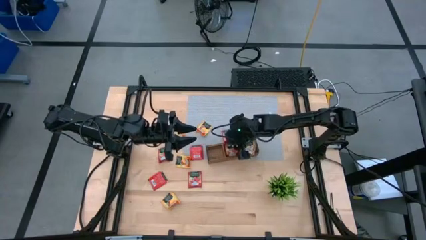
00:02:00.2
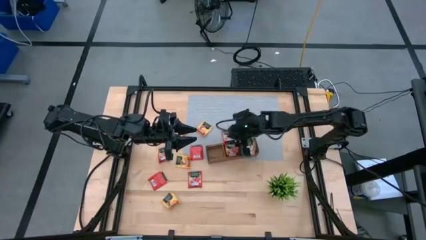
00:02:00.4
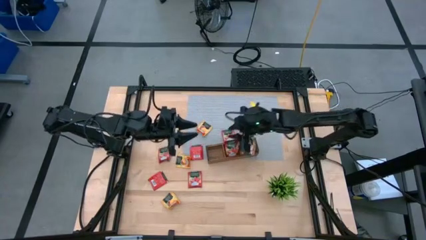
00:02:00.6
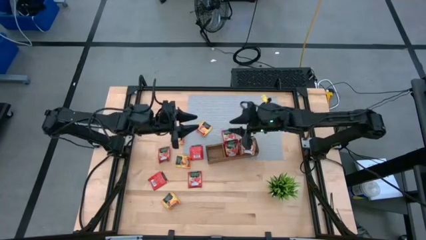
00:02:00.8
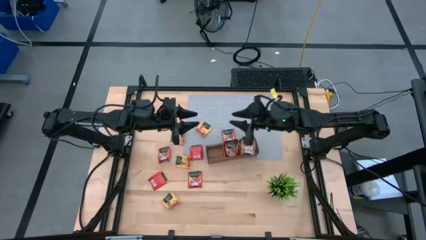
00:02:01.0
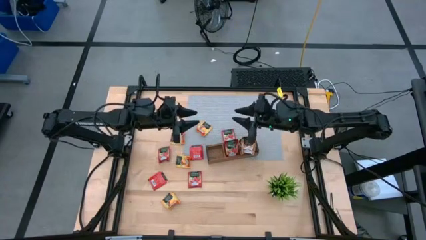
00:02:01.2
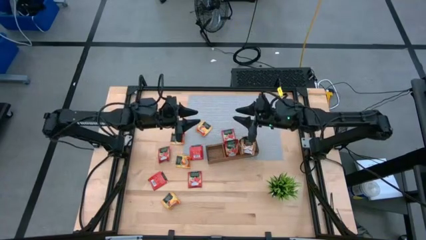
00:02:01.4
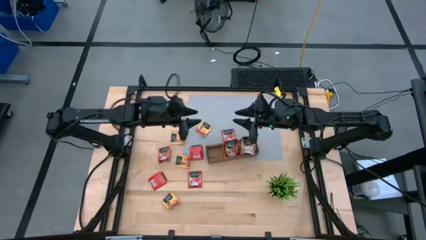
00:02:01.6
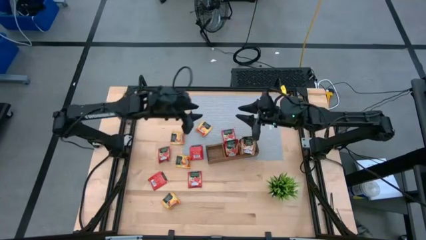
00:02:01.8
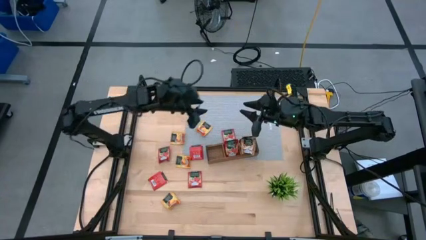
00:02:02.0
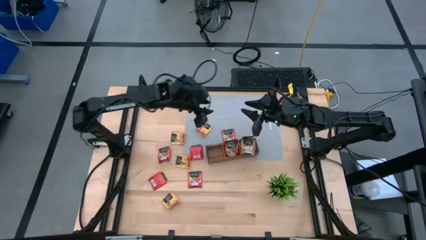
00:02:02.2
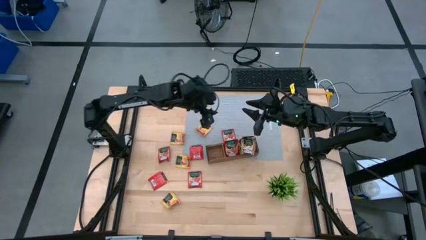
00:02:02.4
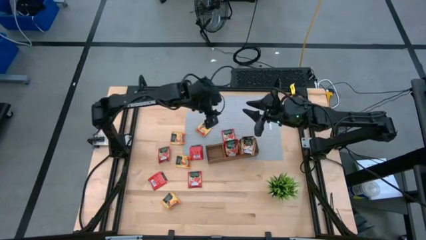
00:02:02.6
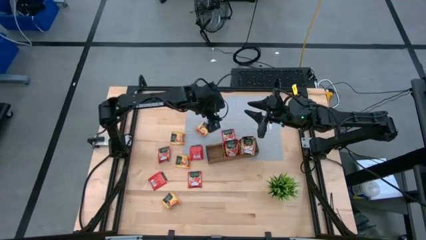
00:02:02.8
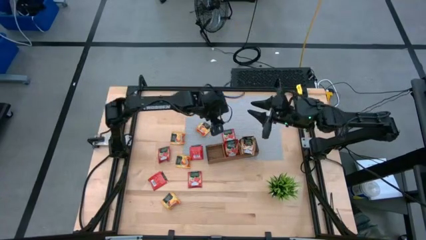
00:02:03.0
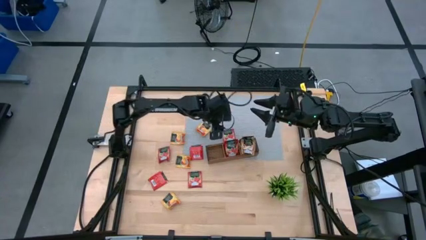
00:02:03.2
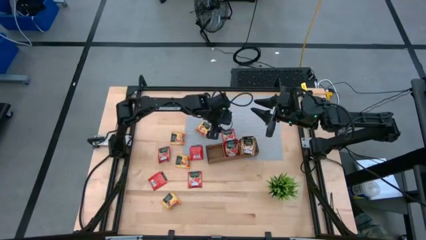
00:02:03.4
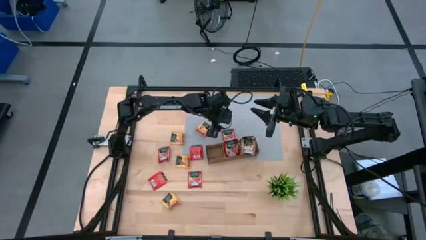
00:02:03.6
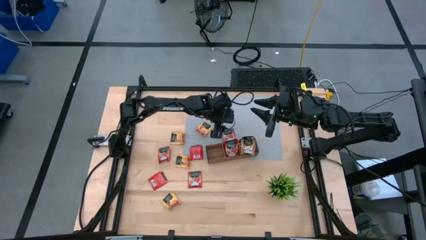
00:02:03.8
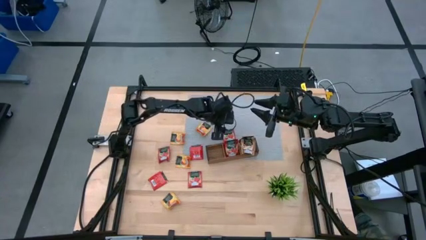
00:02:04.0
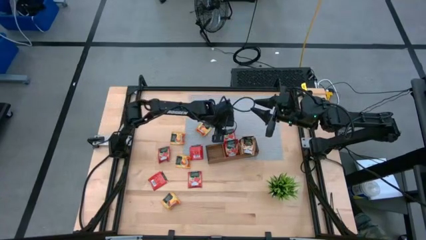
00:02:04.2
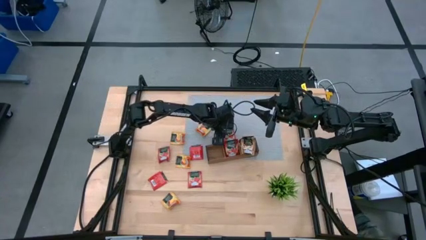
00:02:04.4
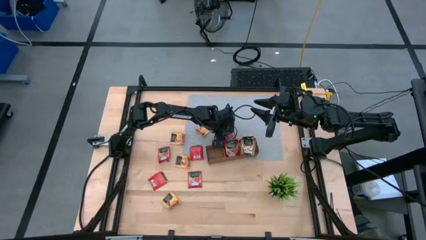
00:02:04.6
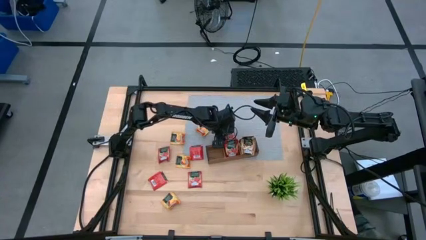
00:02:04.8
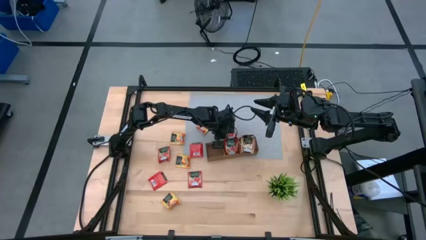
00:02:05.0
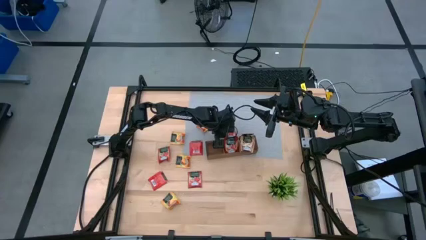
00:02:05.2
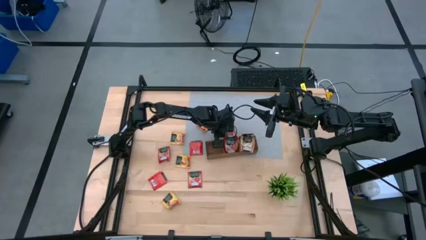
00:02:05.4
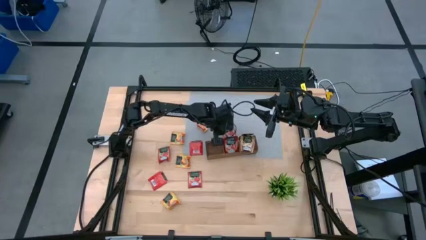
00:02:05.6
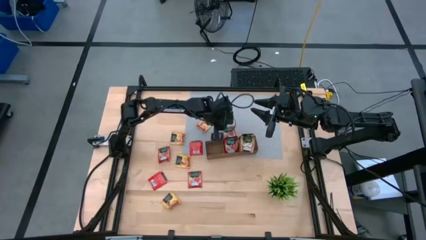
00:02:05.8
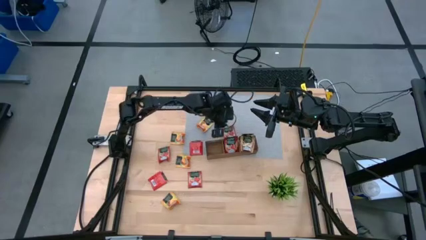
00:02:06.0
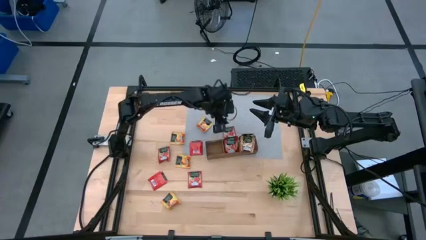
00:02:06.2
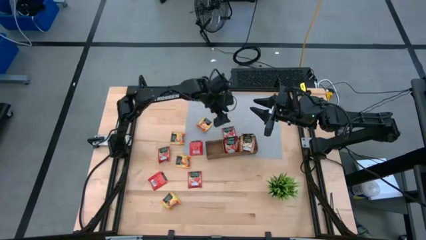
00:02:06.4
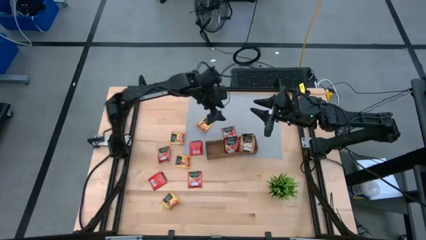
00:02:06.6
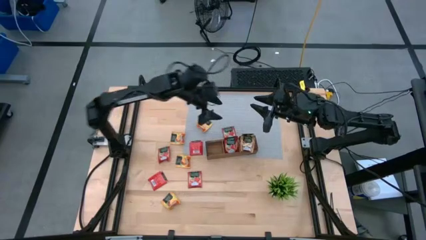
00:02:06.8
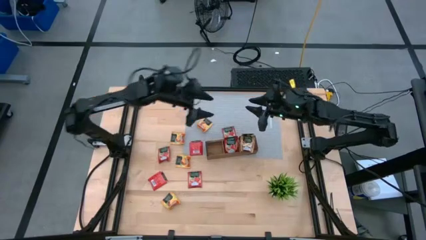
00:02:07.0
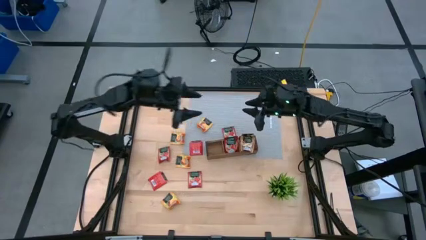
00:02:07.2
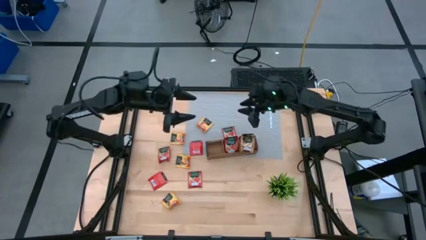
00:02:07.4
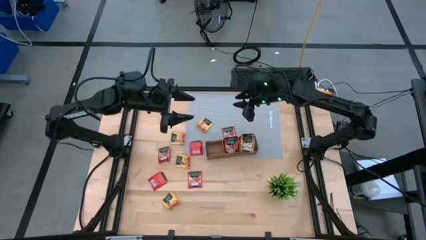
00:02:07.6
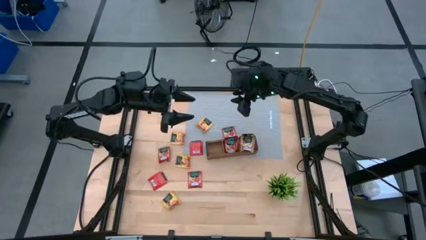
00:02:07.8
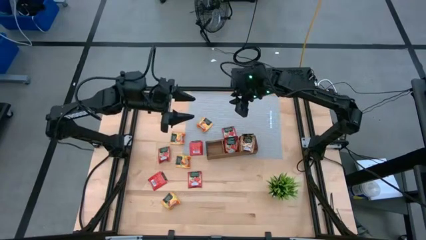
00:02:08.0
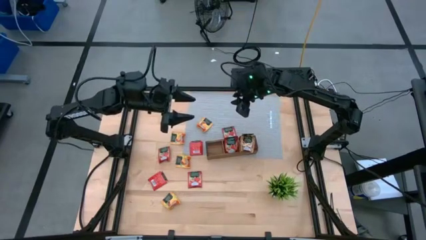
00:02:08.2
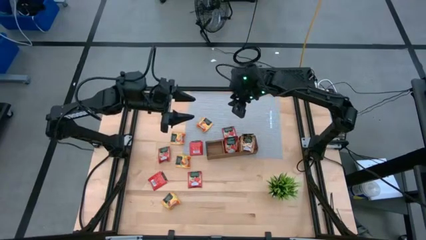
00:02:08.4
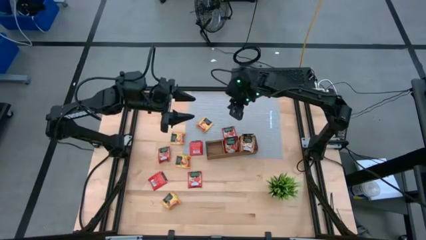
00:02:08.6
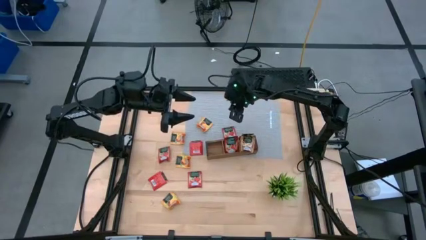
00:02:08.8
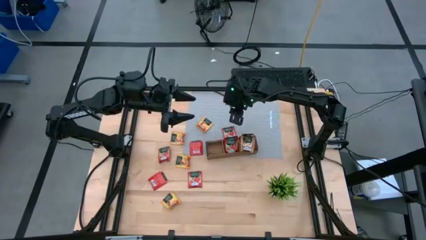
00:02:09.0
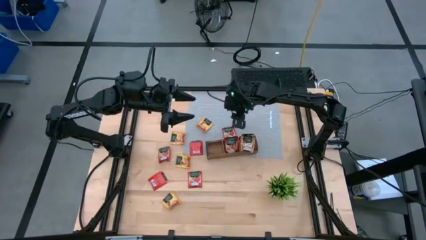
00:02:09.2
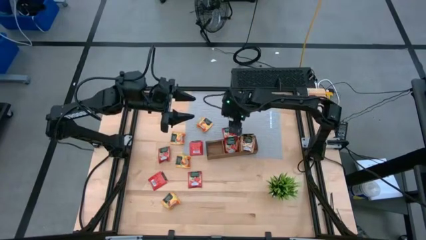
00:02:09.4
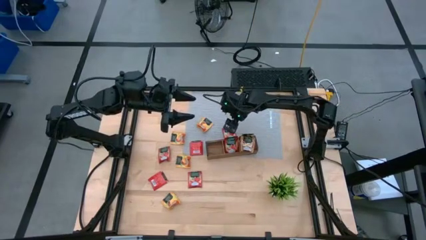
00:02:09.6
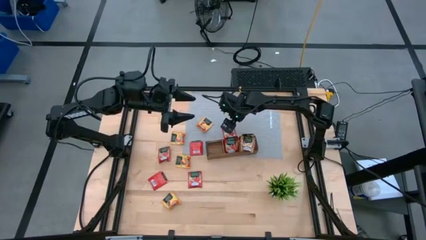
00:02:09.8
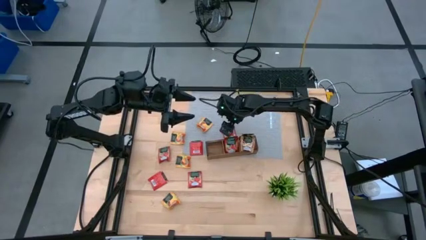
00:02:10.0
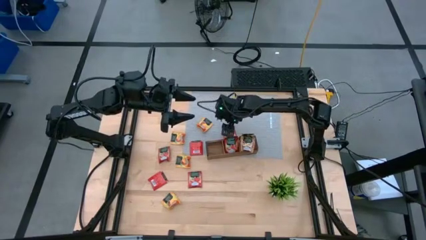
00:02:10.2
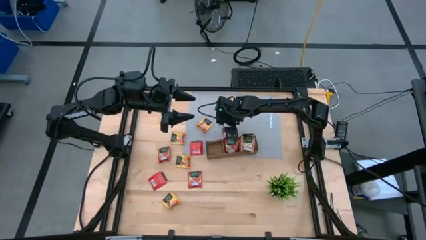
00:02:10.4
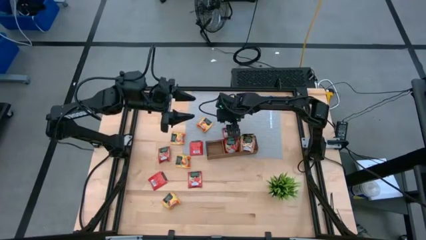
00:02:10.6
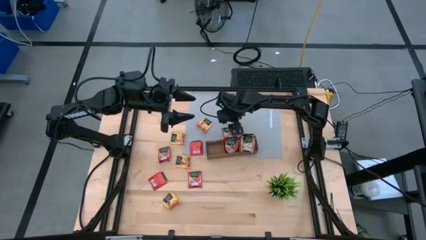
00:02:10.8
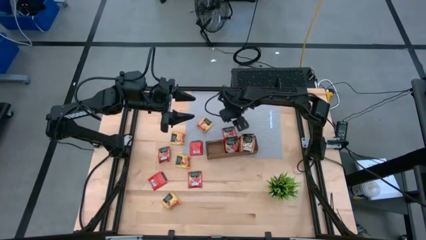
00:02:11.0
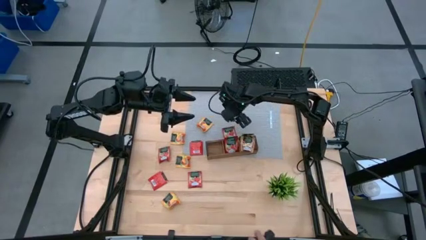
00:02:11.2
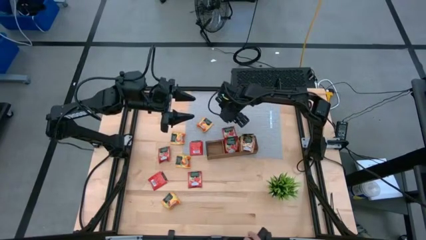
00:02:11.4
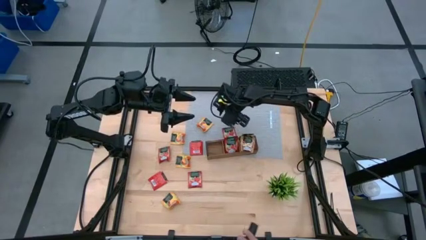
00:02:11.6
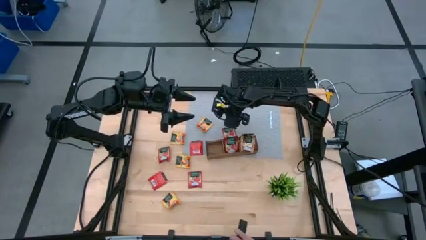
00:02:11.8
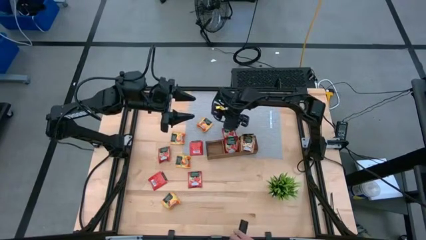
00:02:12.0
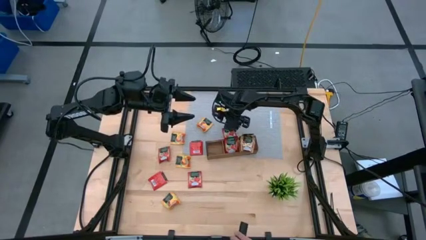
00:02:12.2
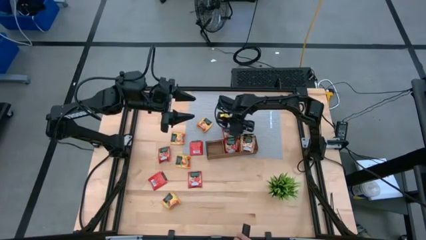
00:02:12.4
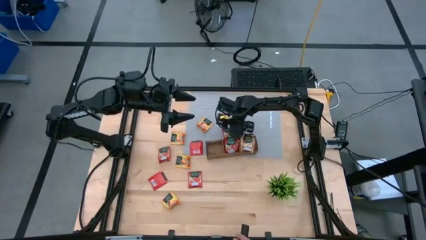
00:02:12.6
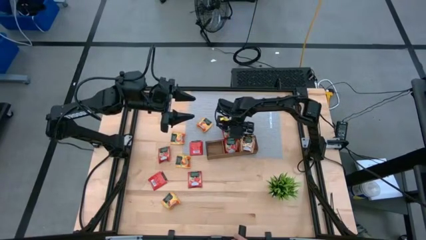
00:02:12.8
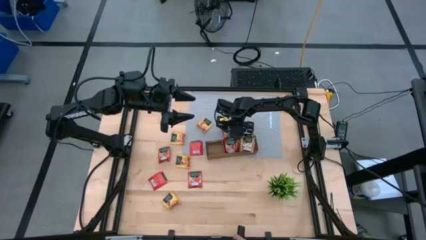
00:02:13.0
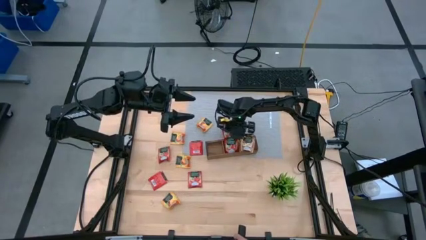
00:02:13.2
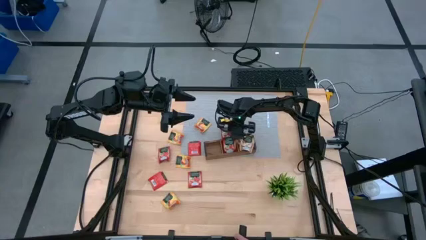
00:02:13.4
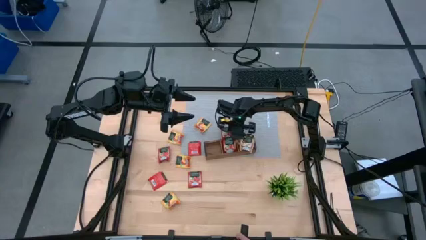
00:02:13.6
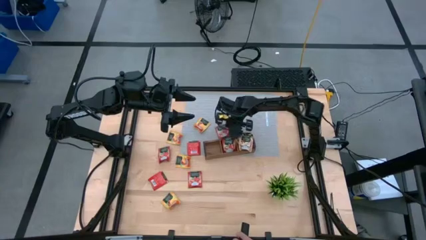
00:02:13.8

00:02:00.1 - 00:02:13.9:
Task: Pick & Place Tea
Put the red tea bag into the middle section of the wooden organizer
